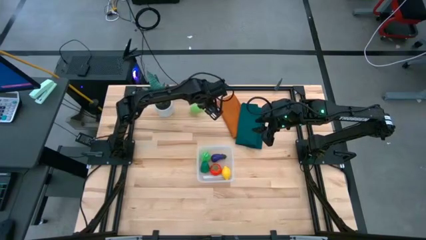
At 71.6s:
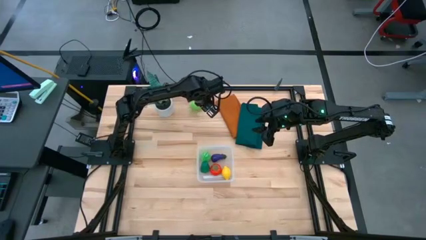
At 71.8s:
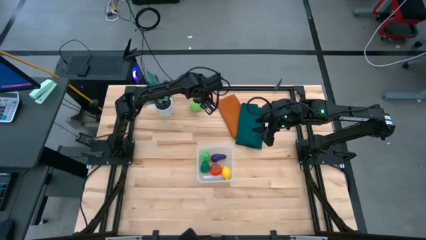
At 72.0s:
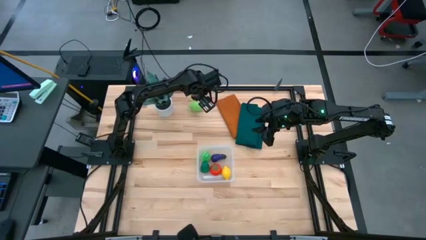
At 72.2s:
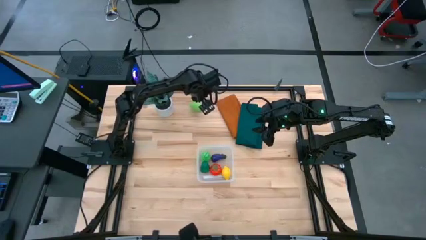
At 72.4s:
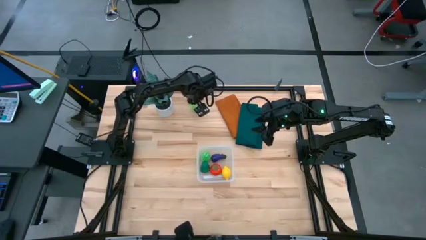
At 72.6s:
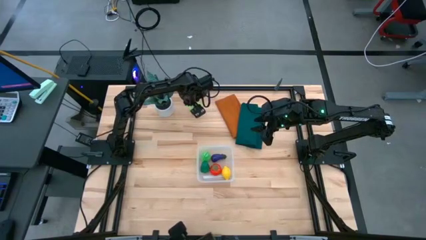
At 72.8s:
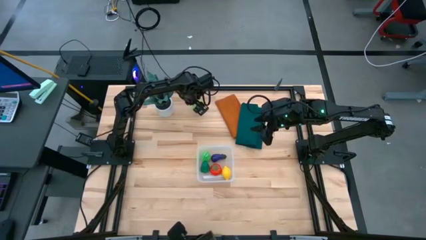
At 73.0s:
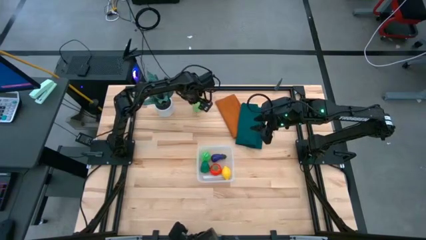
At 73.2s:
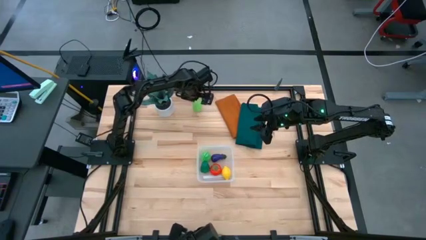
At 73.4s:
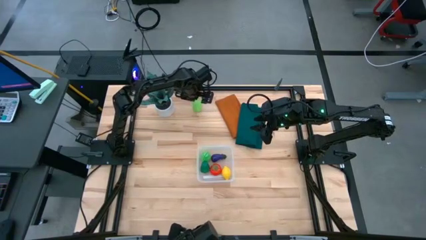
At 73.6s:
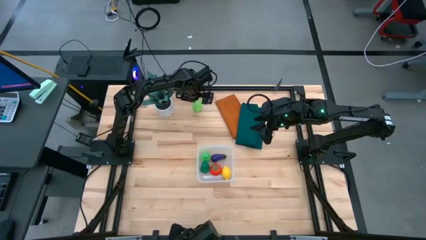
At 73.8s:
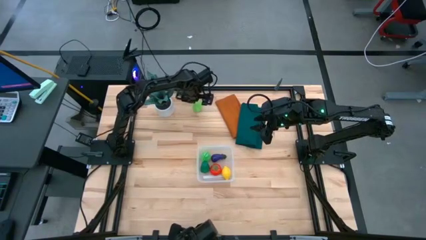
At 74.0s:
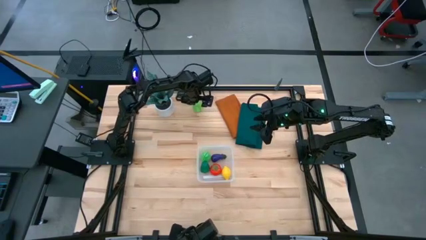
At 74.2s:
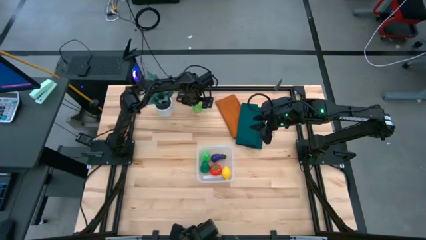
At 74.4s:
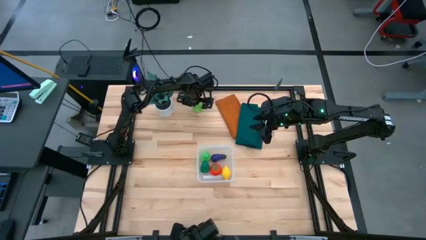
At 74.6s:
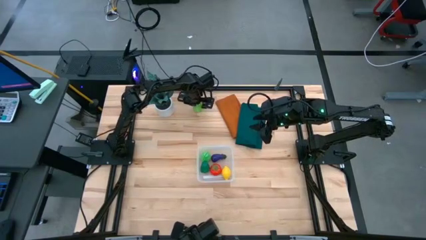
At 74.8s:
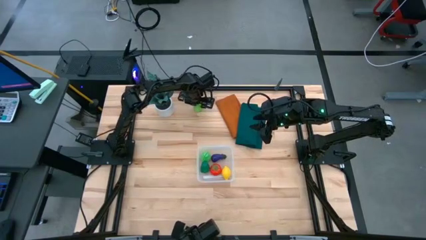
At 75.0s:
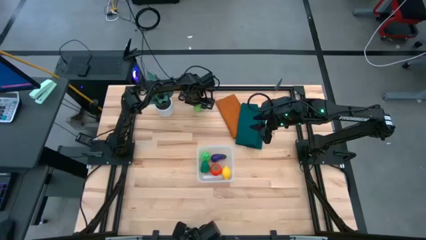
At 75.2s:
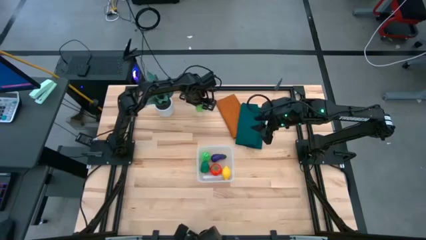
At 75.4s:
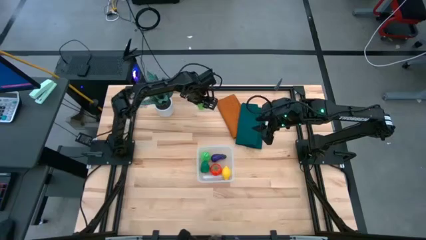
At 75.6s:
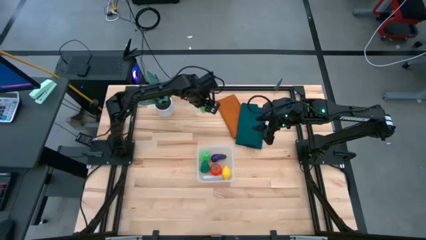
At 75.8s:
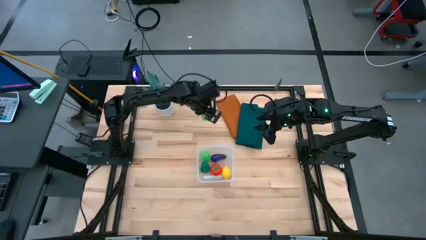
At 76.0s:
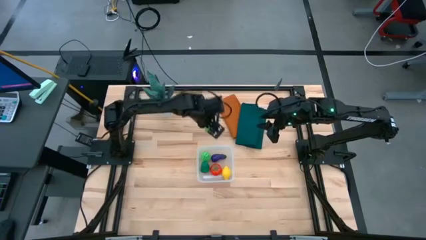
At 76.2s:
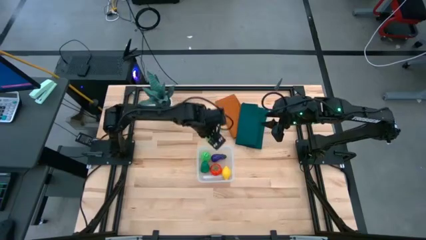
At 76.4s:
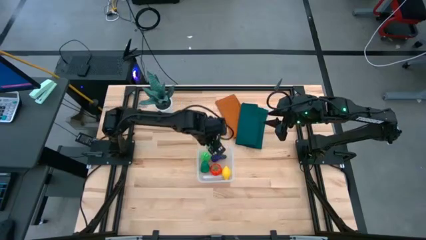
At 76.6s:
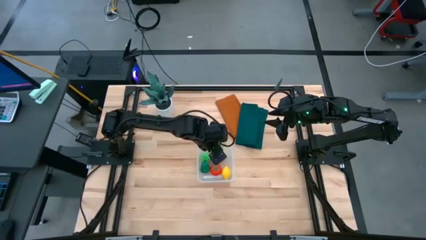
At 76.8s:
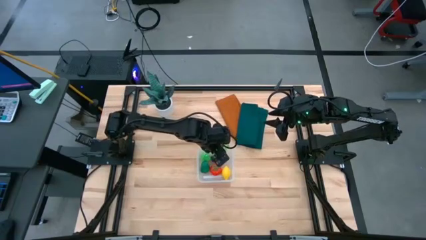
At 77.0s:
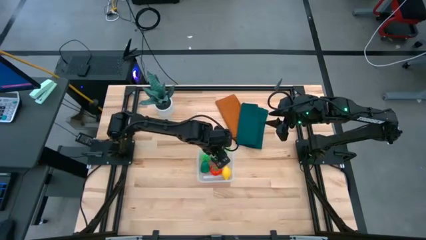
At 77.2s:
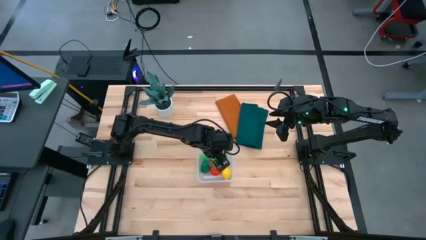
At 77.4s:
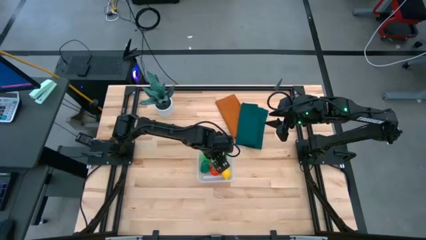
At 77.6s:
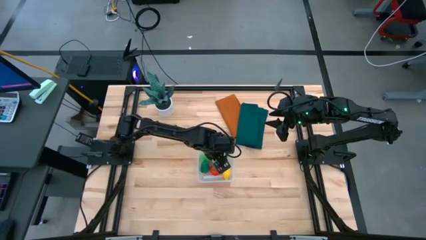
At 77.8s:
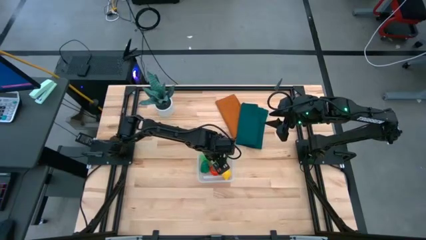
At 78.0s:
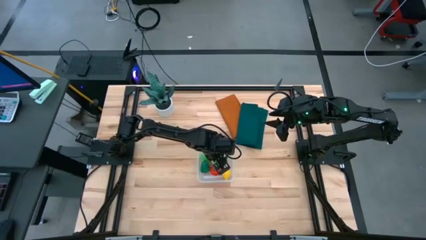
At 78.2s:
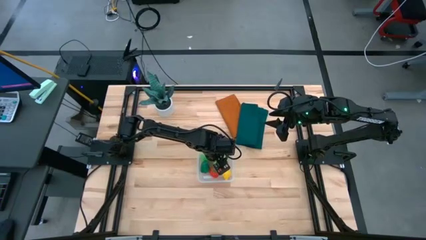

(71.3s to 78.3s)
Task: Pick and placing Produce into tupperware
Put the green honeydew melon into the transparent container

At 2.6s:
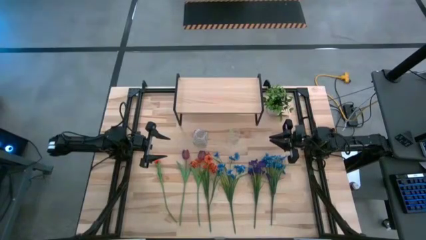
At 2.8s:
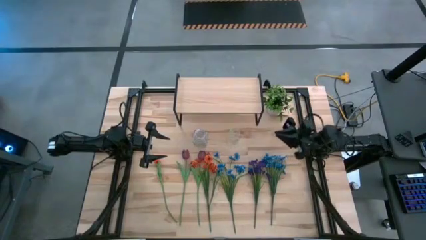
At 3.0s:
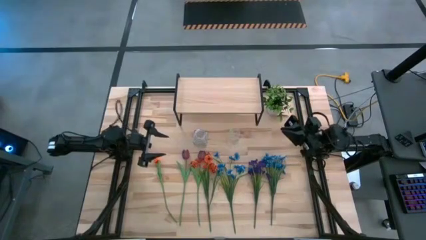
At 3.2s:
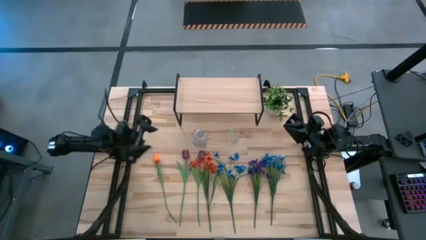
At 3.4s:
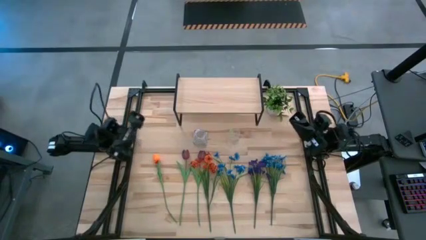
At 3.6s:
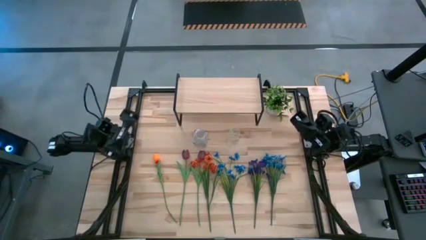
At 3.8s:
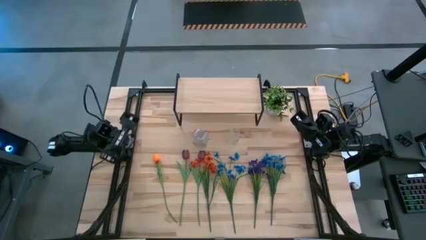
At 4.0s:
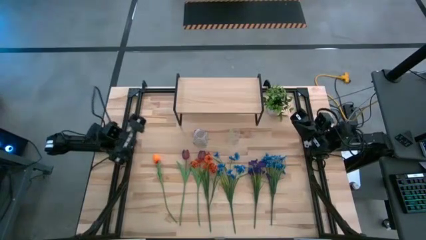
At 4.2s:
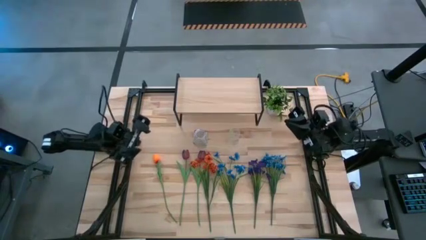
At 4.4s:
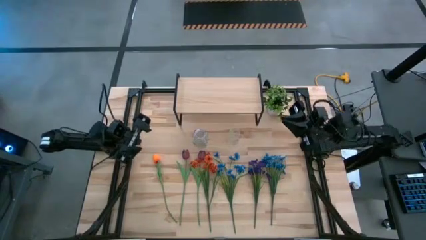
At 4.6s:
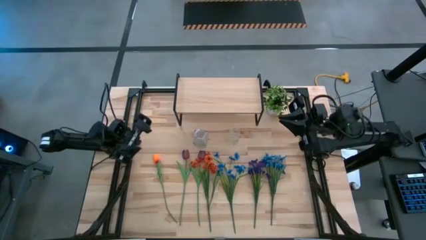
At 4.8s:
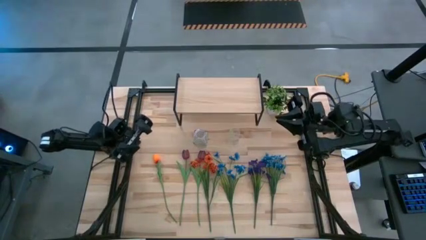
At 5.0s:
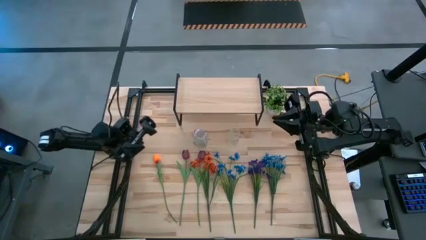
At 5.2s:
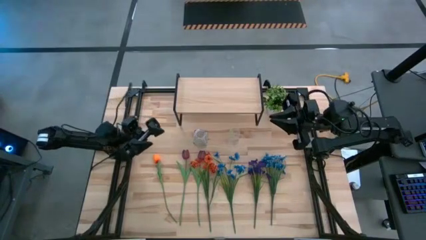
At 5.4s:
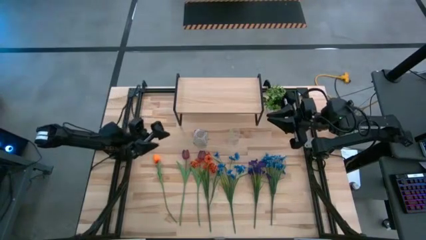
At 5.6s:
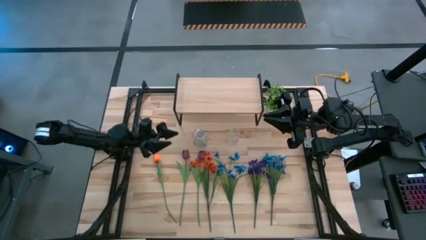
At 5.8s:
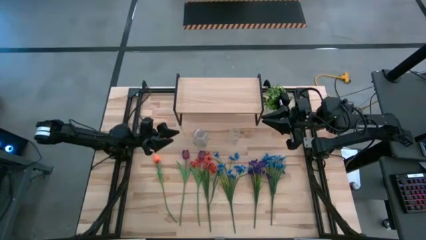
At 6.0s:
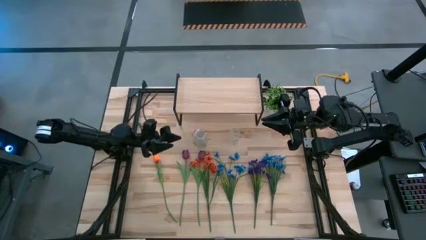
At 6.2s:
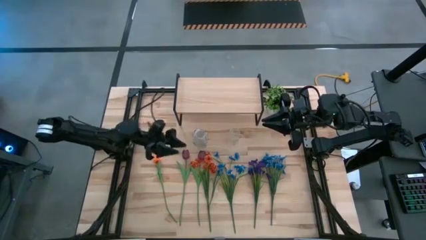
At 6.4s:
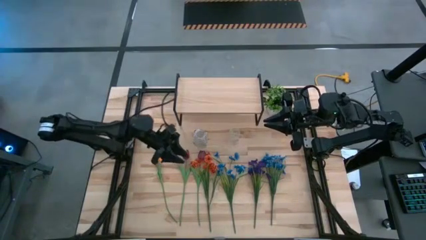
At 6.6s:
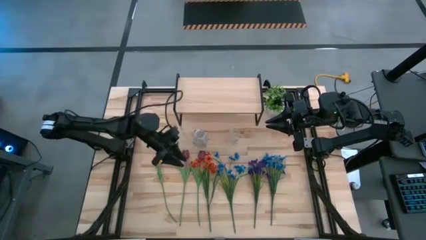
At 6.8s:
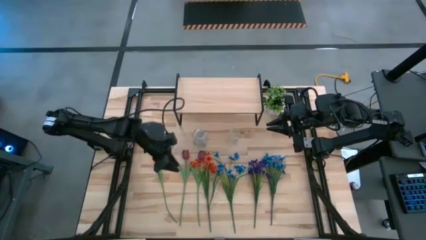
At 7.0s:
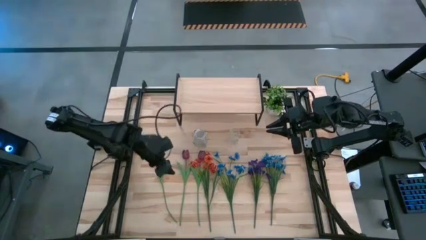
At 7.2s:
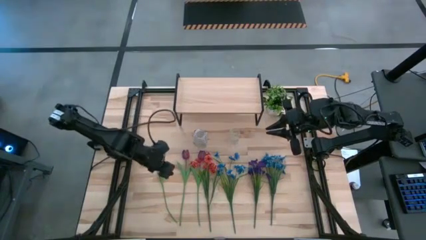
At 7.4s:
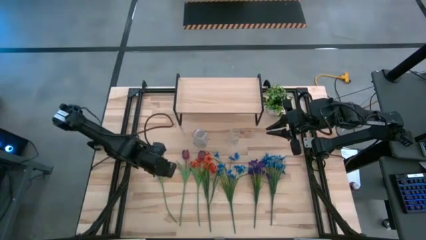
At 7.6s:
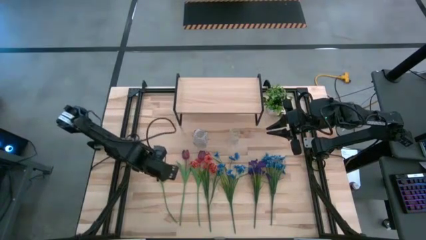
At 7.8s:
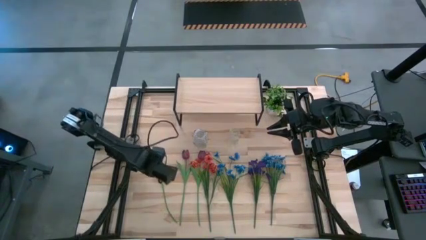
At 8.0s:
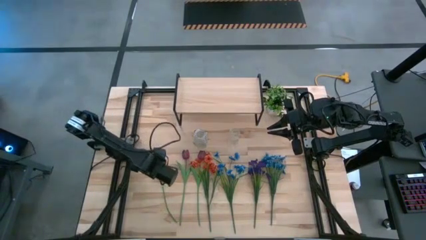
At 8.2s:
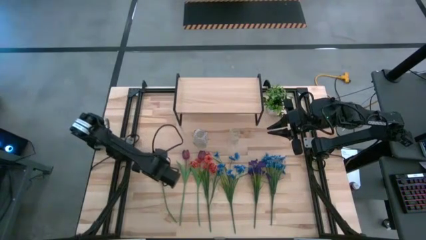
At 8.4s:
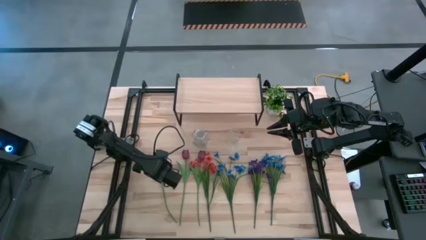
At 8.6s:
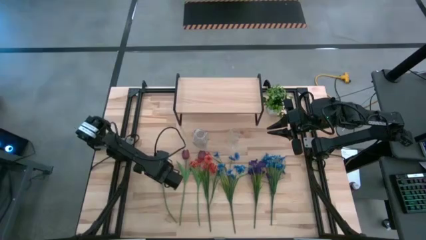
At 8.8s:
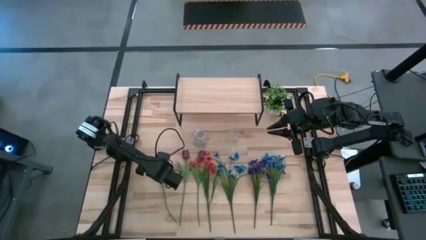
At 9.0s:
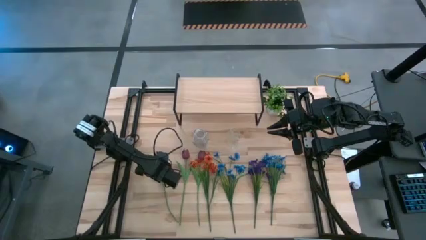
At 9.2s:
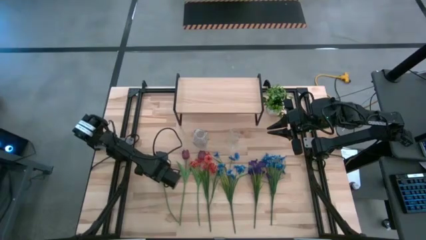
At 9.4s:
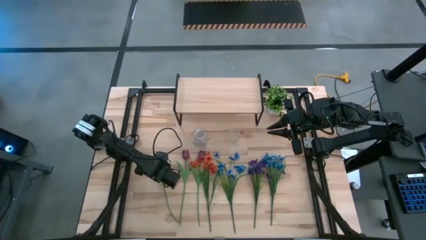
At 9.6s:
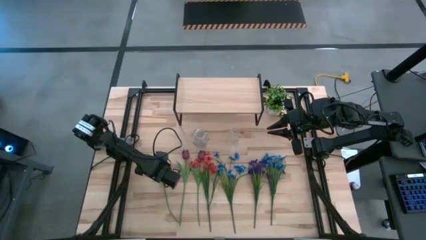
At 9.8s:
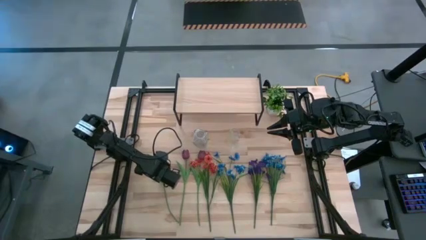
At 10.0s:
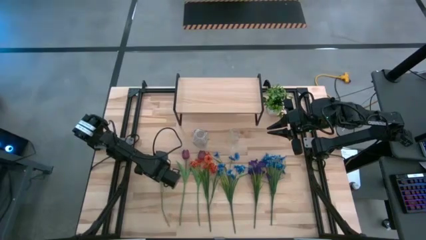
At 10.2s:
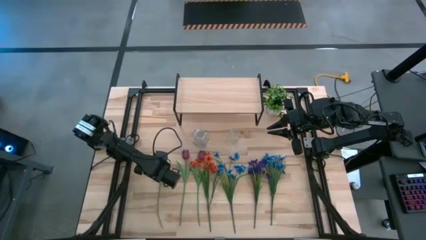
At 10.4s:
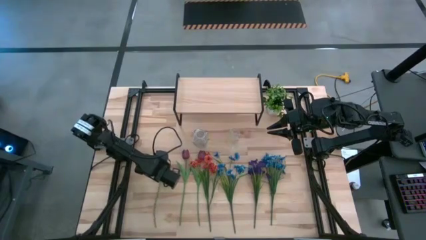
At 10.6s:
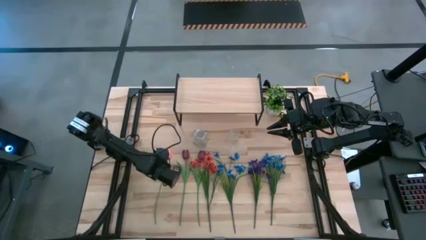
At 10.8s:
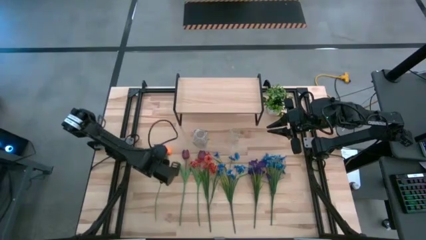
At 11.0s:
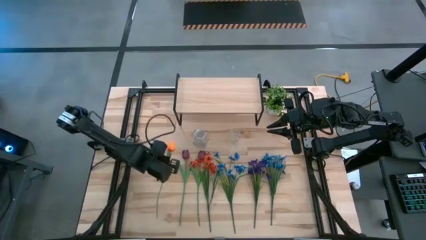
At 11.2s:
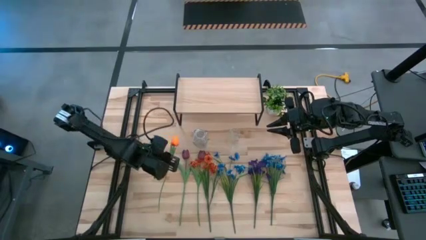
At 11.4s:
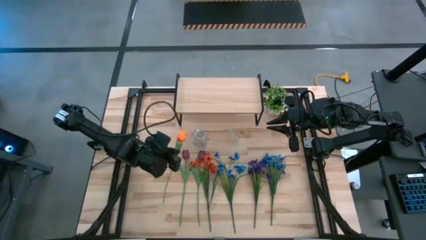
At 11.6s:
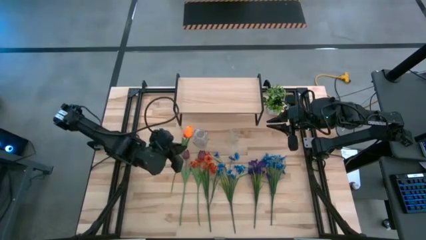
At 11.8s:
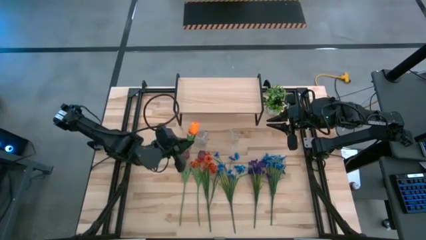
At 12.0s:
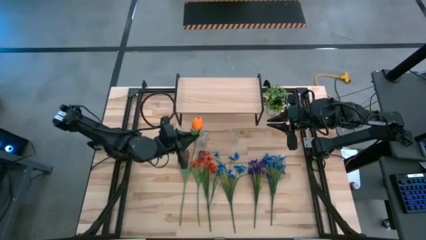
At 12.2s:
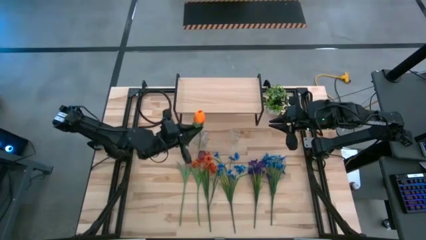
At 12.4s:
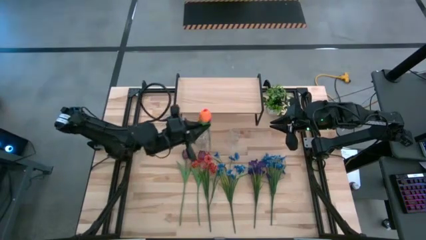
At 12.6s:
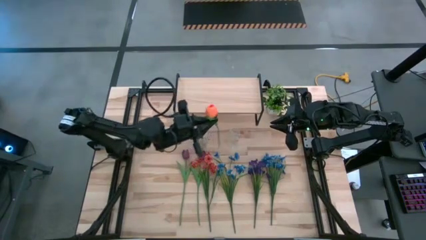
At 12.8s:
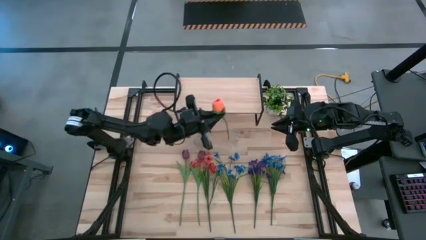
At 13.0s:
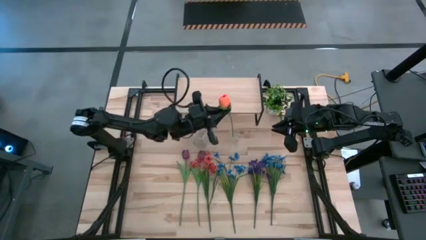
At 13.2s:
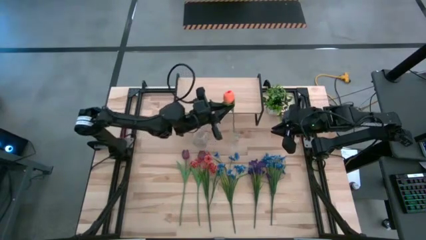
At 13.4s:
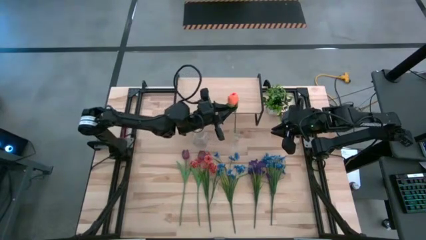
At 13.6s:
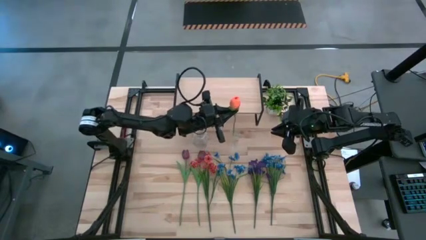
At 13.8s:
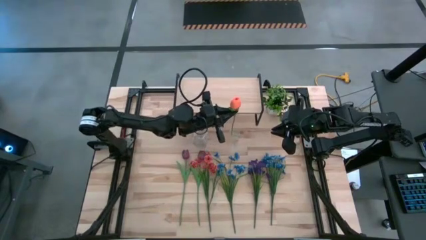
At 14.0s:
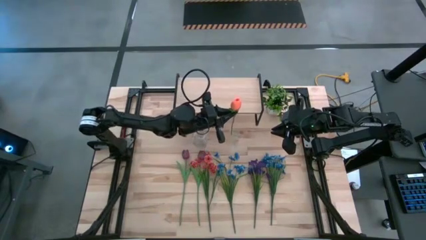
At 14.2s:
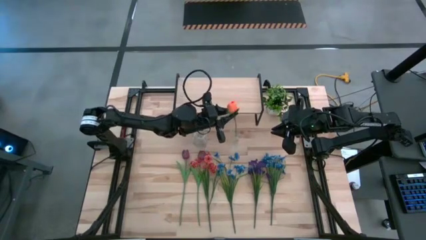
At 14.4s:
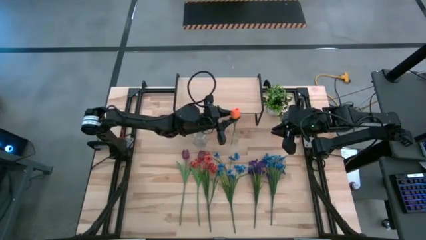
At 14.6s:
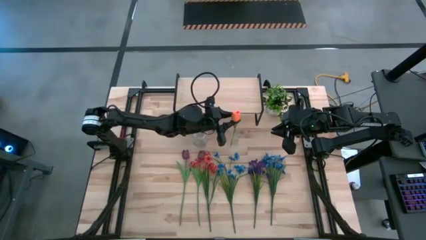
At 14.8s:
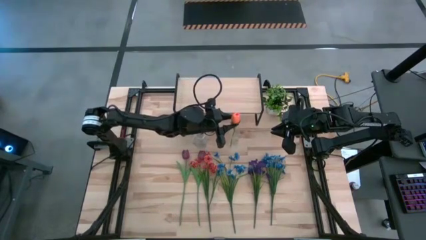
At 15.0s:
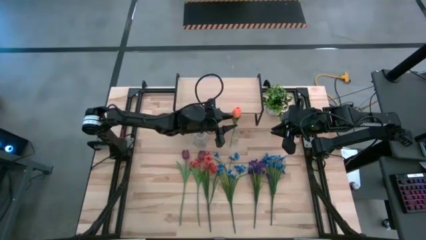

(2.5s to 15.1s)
Task: Pick and place flowers into a vace then onto a shelf
Put the orange flower into the right transparent vase
